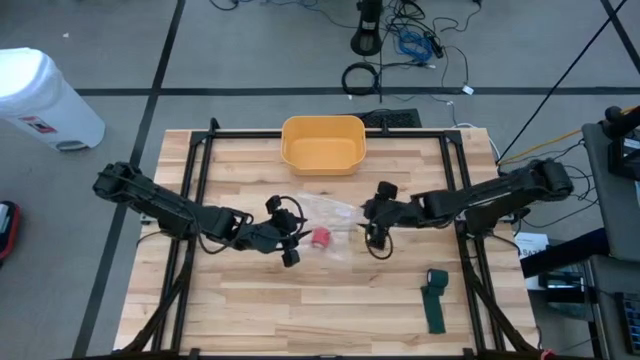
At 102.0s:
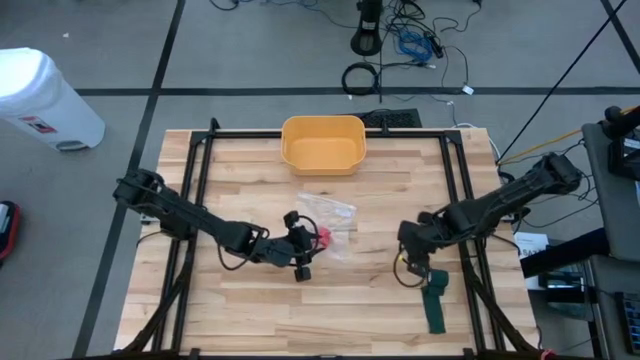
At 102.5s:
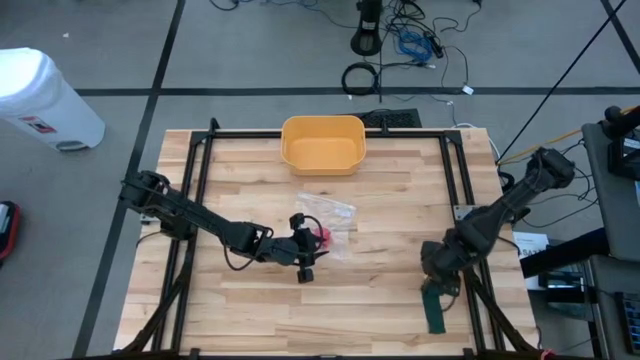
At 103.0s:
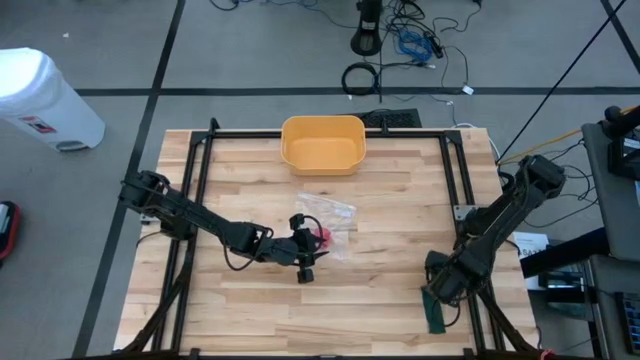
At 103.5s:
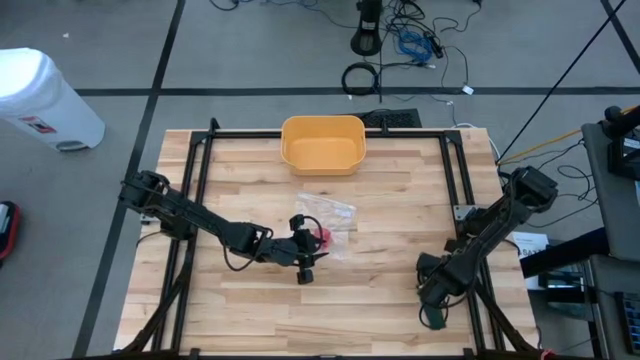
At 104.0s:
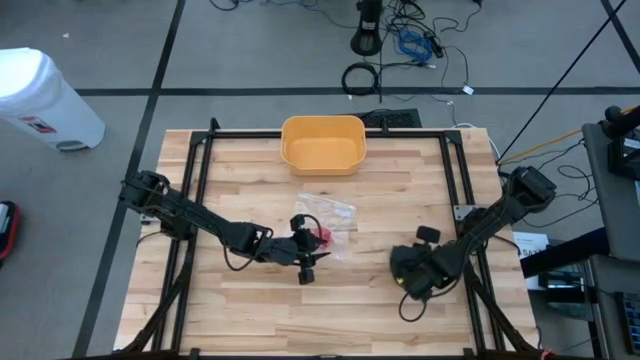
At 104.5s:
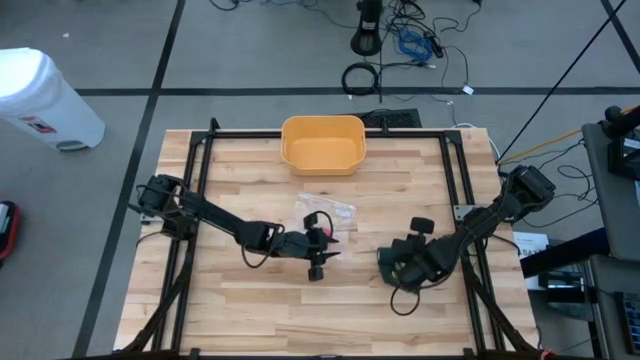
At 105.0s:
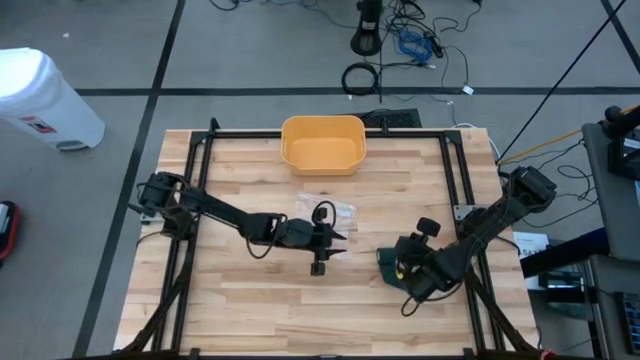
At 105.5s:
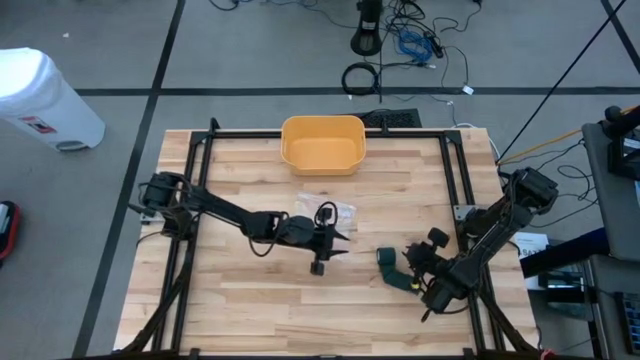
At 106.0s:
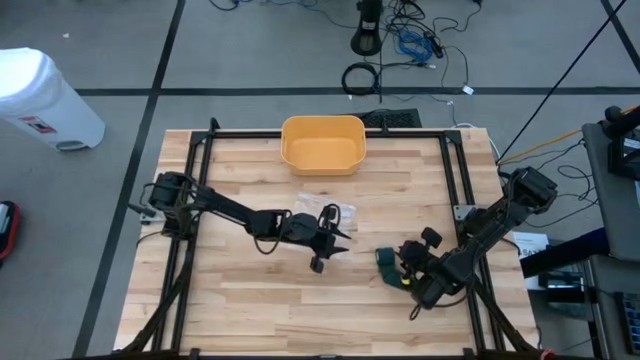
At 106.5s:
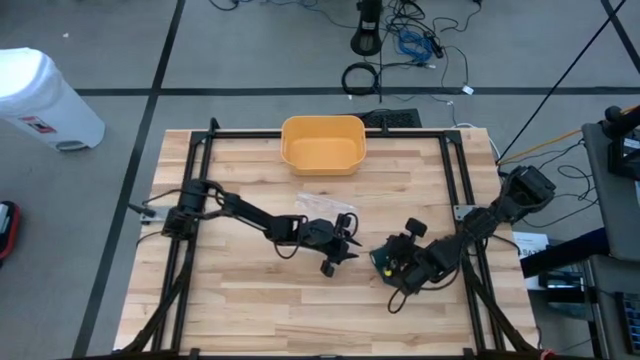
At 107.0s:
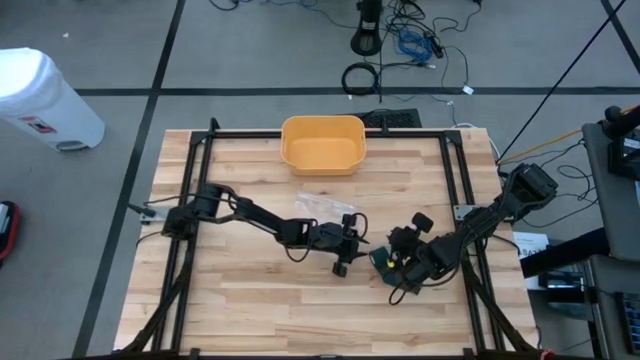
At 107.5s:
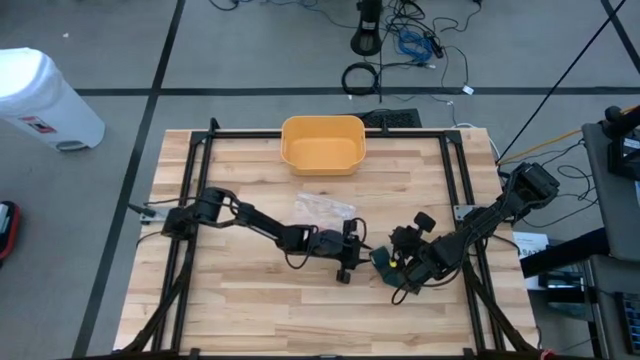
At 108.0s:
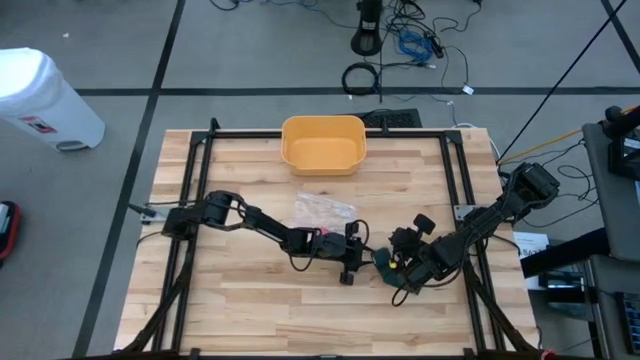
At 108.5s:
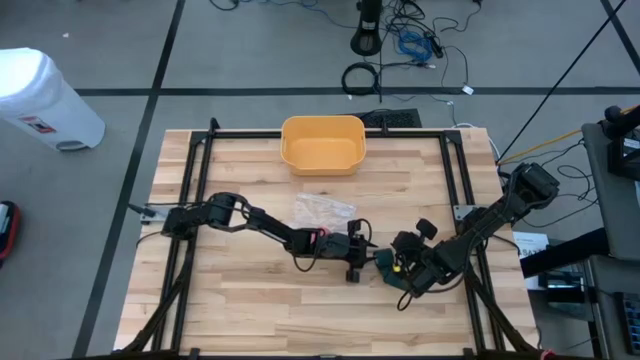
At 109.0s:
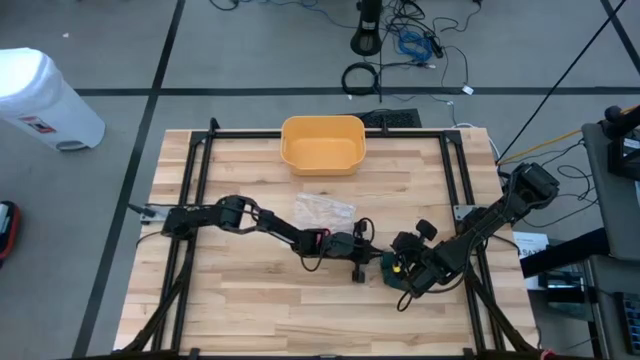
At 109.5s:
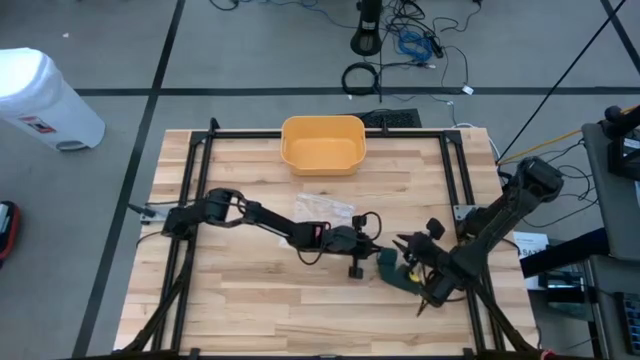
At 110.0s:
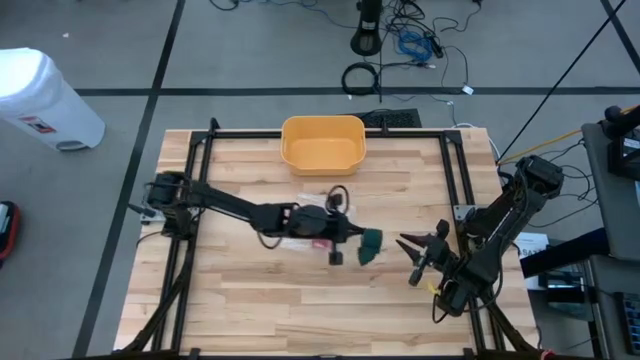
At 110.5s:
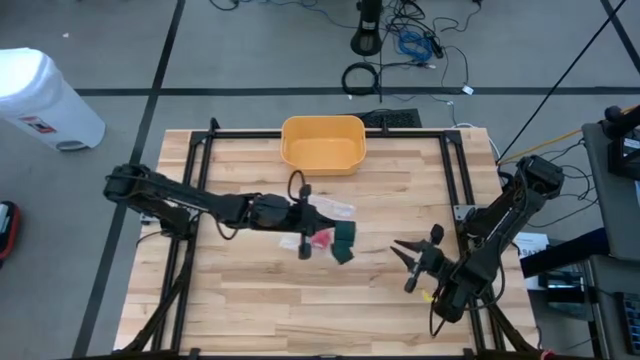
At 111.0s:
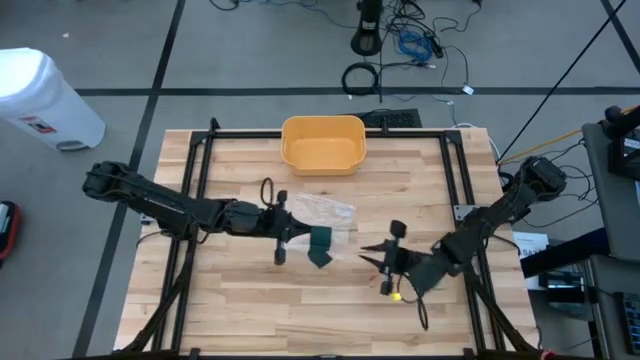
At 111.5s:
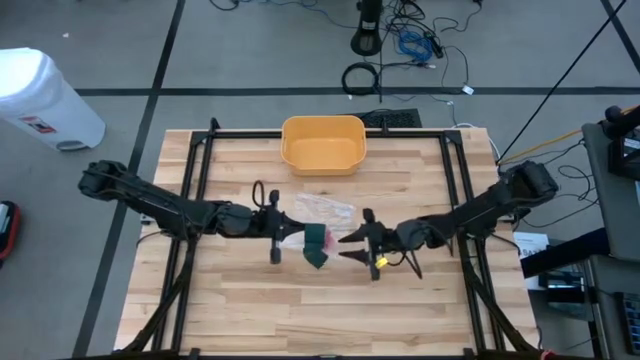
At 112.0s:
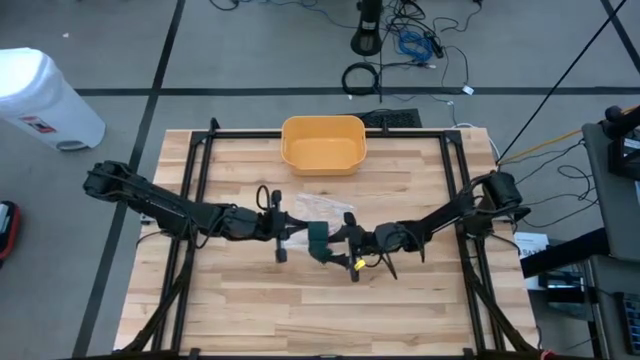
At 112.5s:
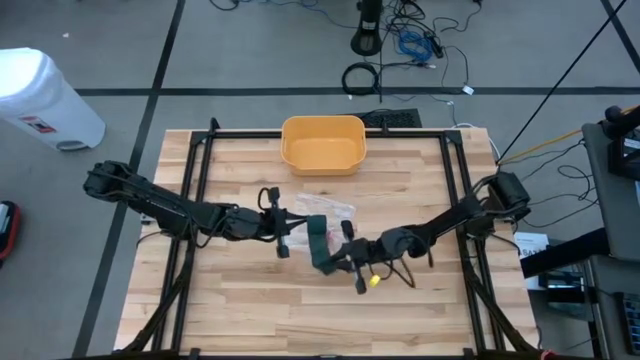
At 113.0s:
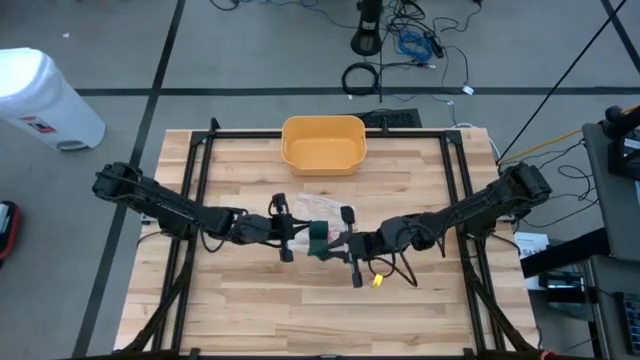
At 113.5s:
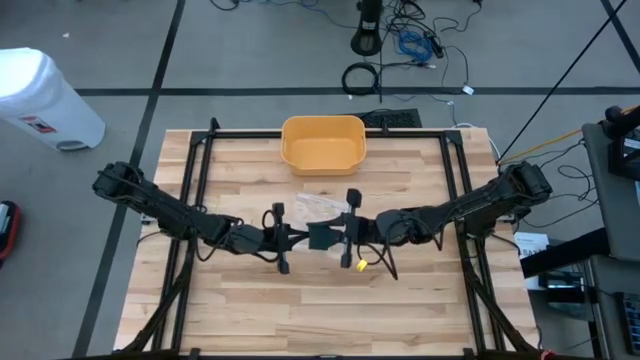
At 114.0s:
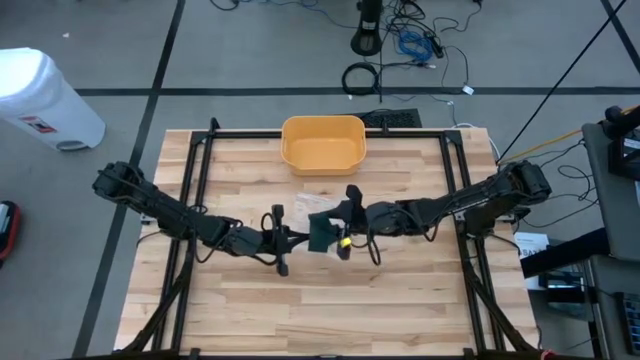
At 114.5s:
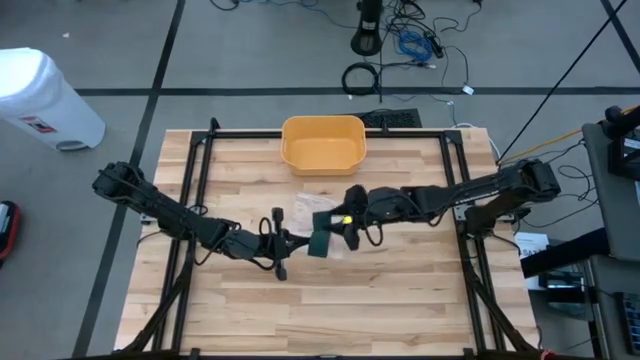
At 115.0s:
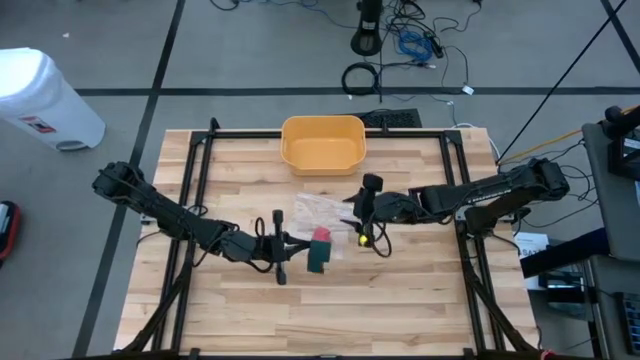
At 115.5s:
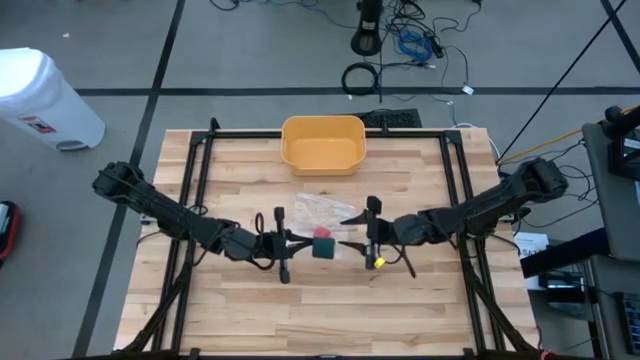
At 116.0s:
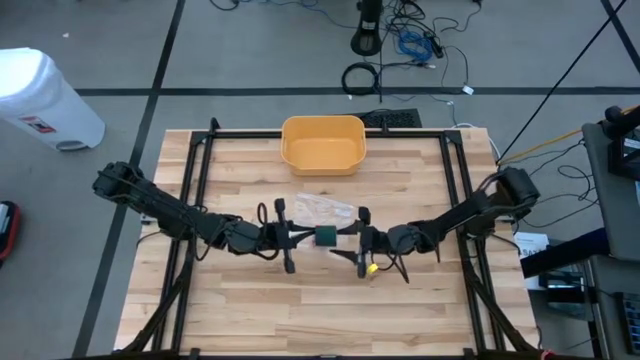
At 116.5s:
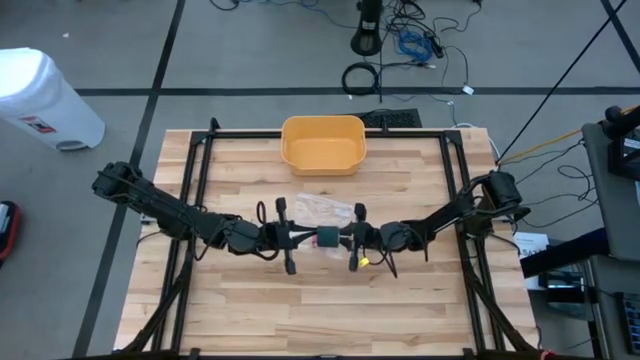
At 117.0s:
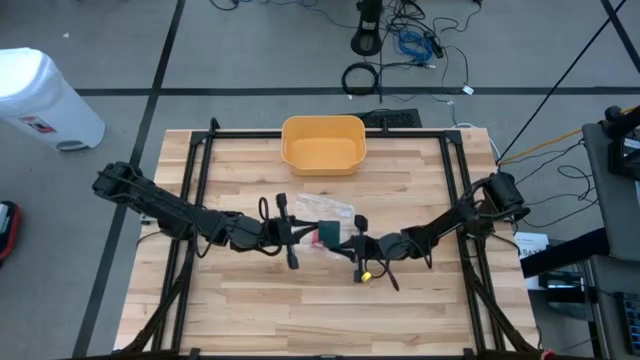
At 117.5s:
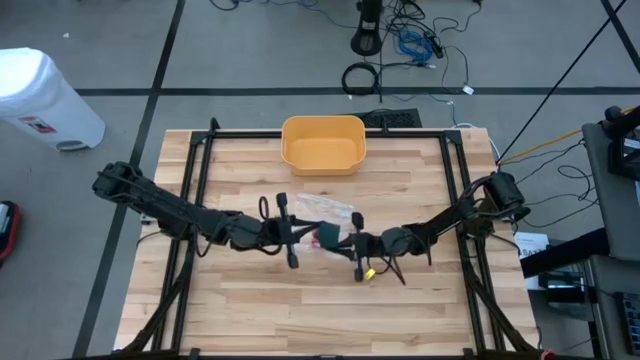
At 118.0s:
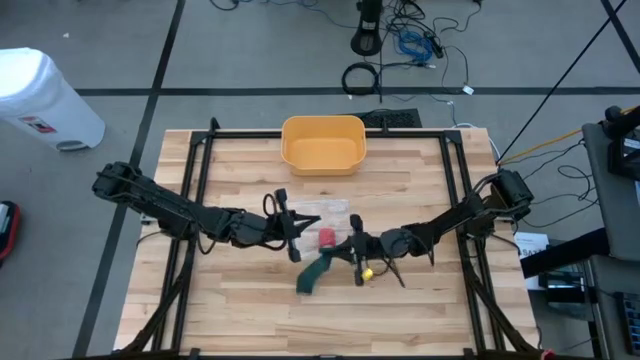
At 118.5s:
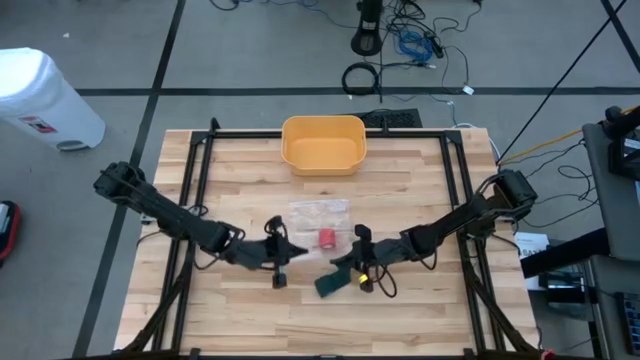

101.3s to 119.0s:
Task: Roll bandage
Roll the green bandage

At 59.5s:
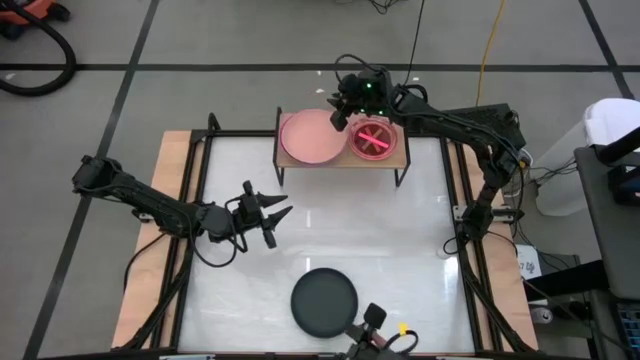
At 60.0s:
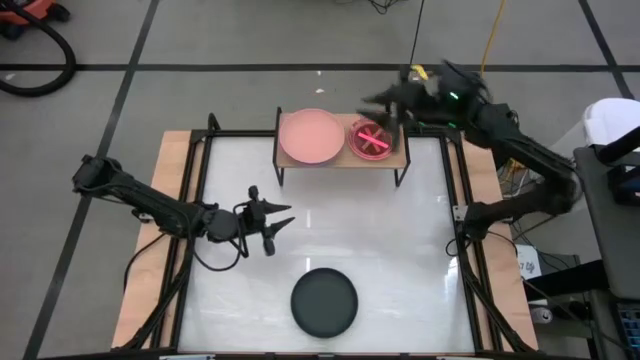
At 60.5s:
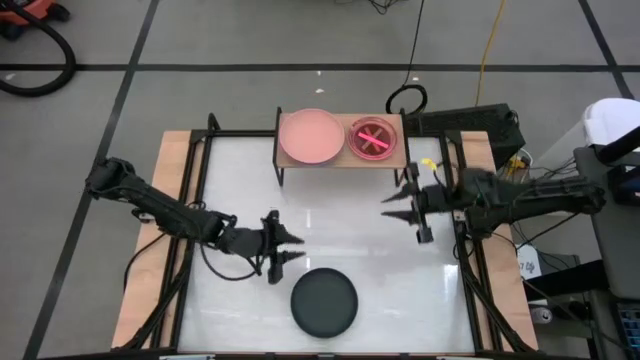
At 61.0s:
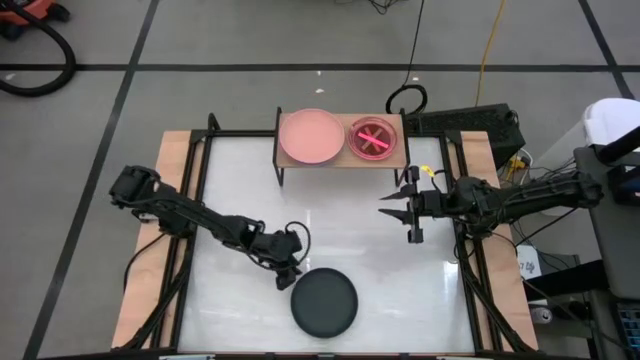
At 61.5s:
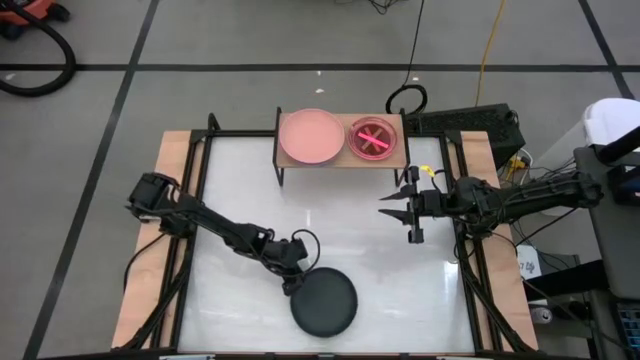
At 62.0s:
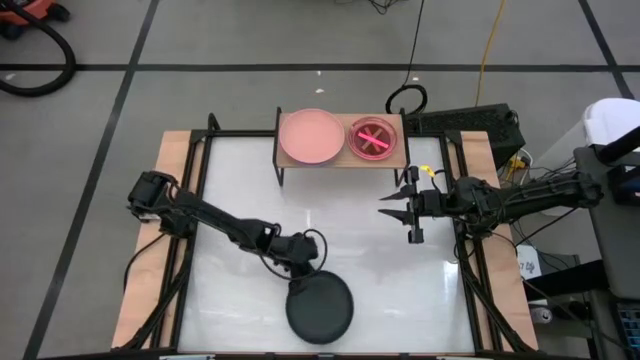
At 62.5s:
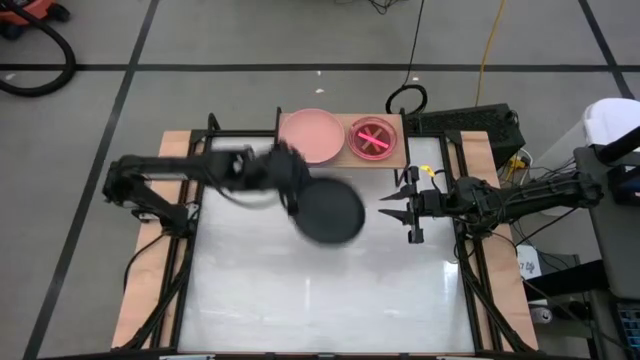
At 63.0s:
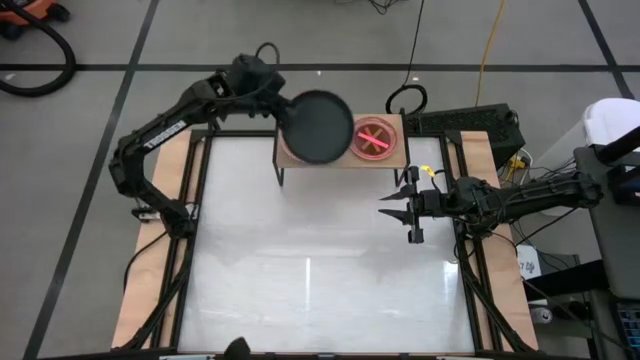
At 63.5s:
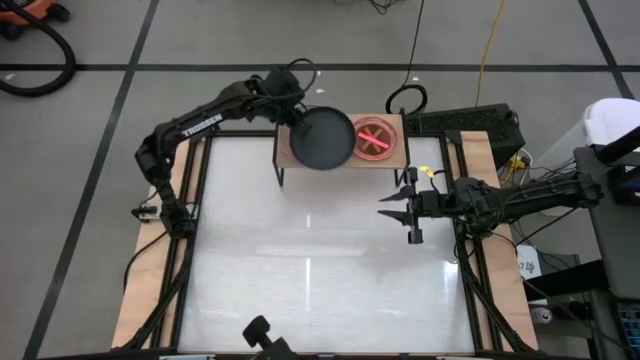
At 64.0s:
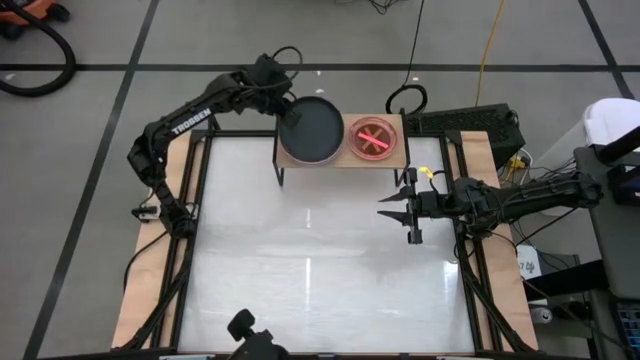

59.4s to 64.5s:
Task: Place and stack plates onto a shelf
Stack the black plate on top of the light orange plate on the shelf
